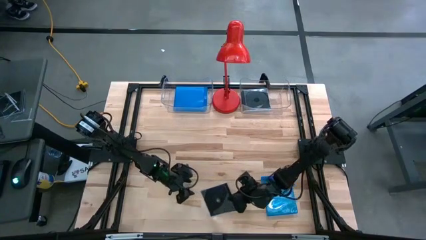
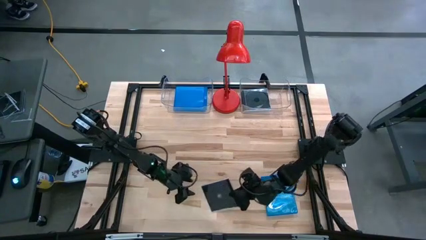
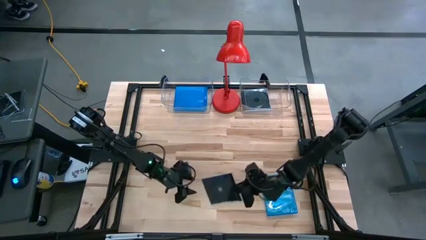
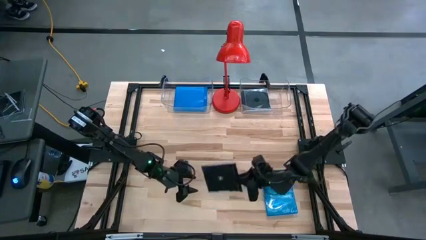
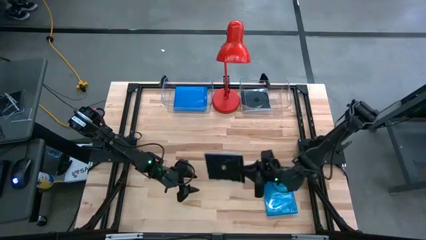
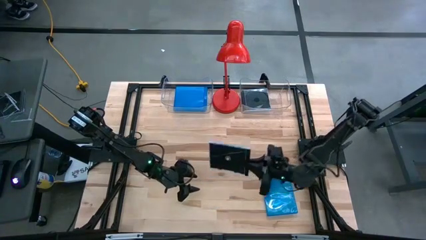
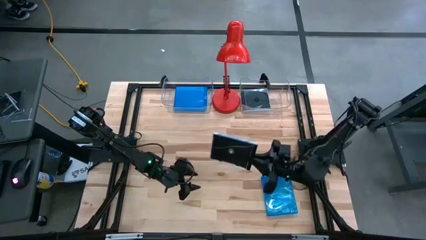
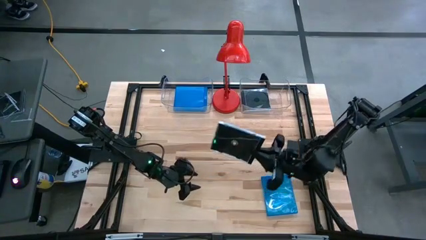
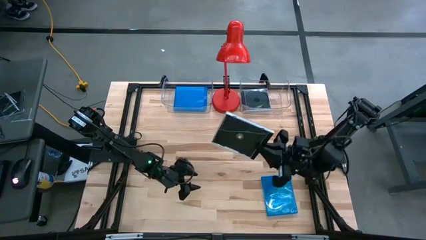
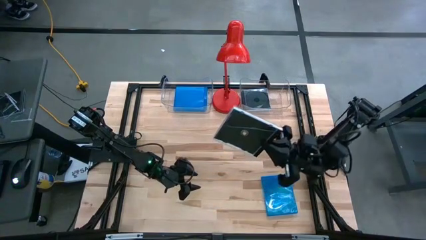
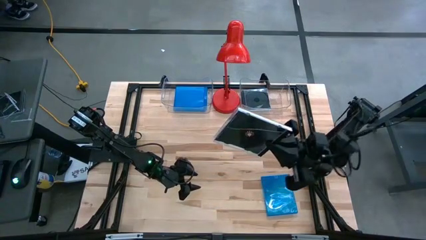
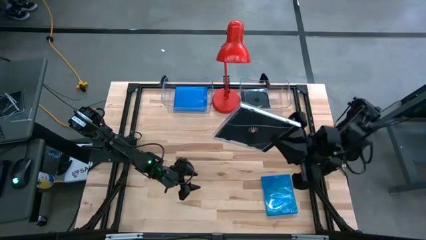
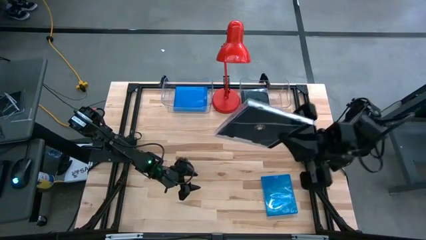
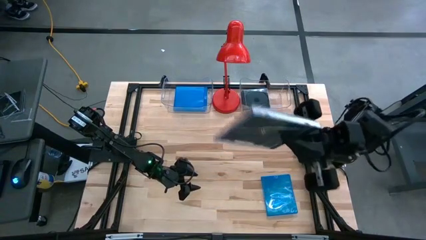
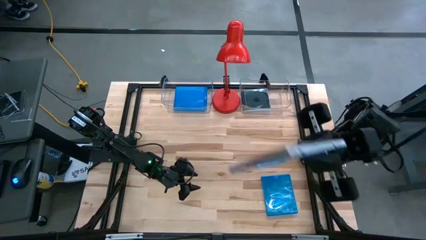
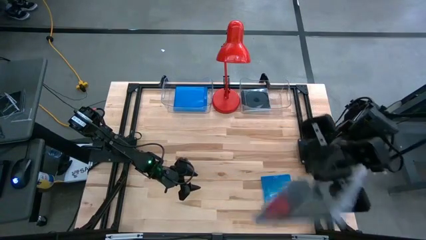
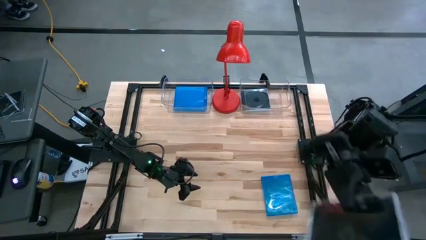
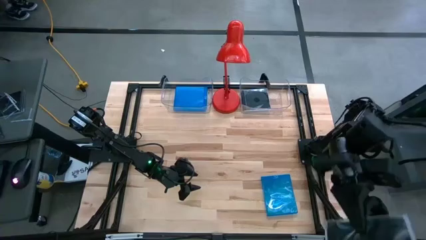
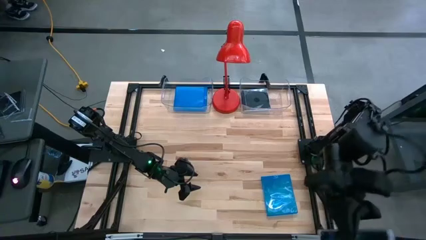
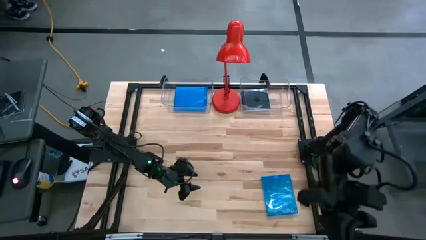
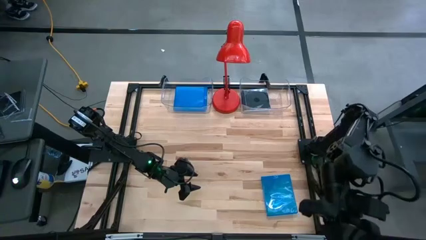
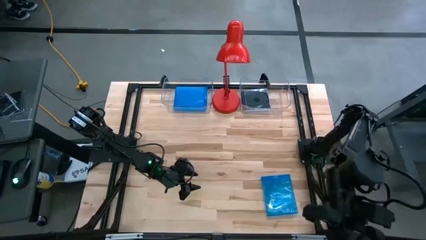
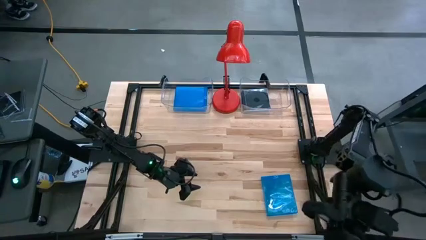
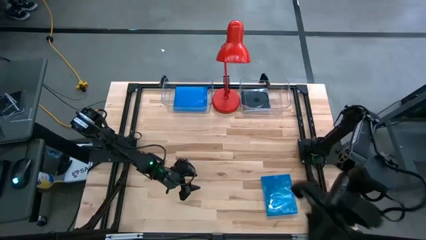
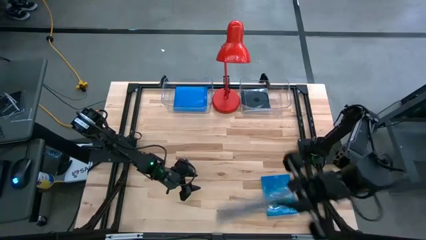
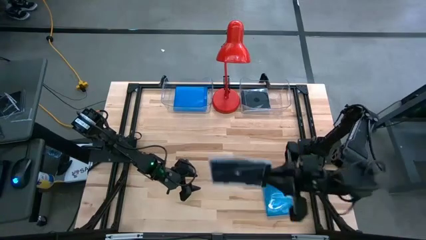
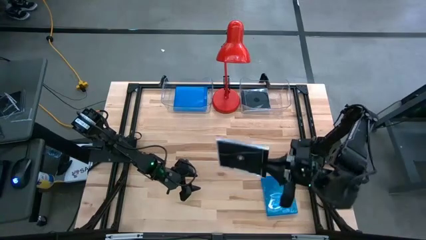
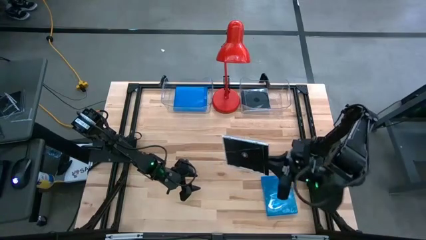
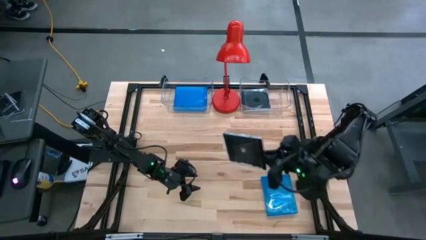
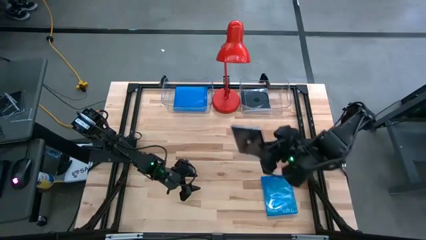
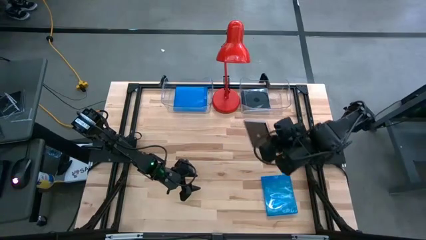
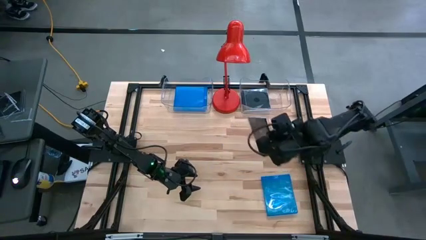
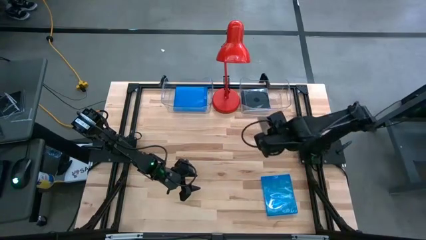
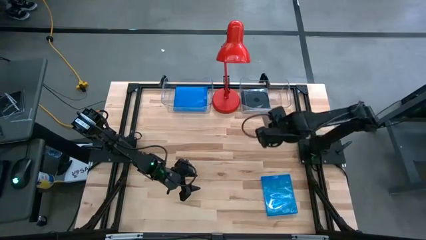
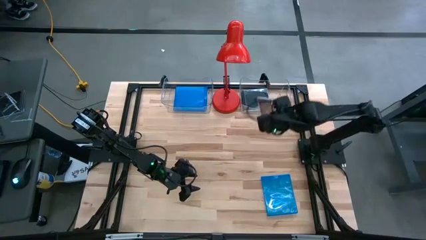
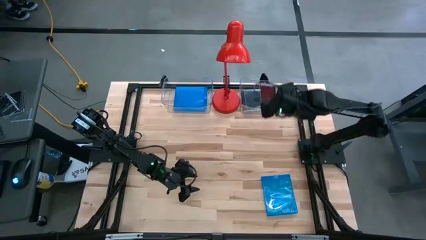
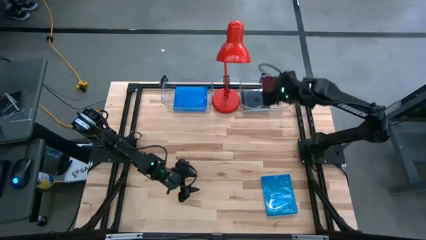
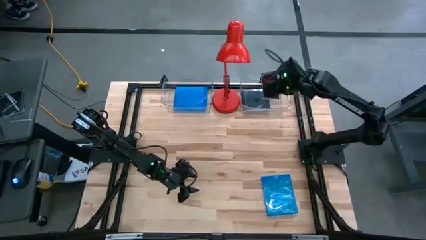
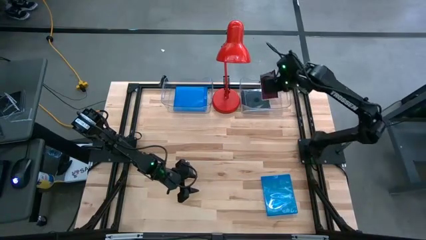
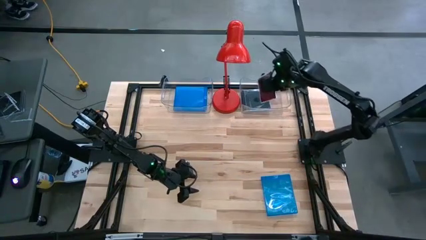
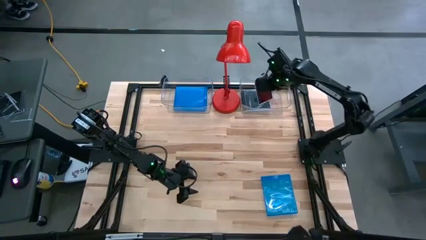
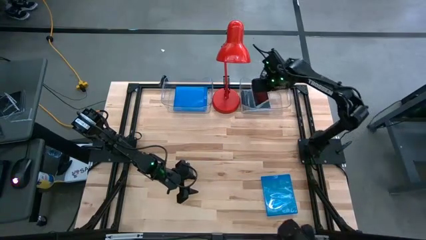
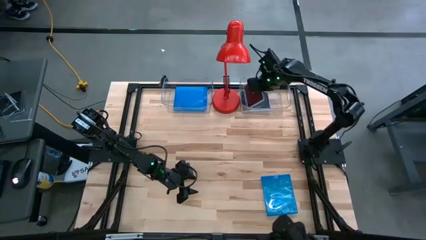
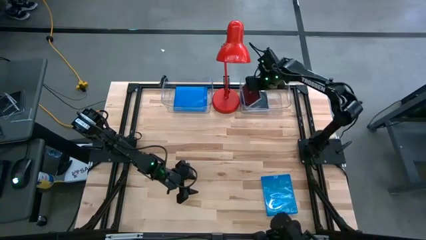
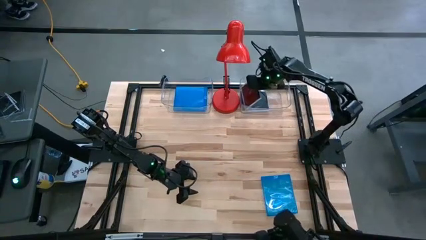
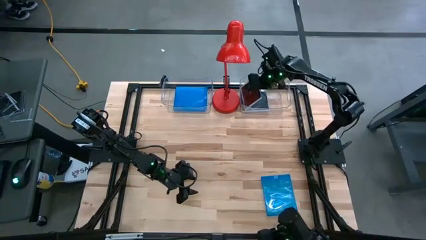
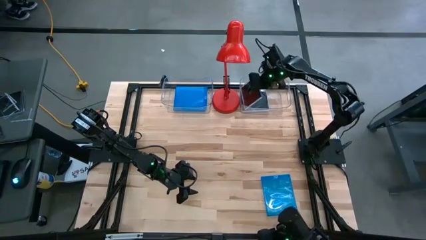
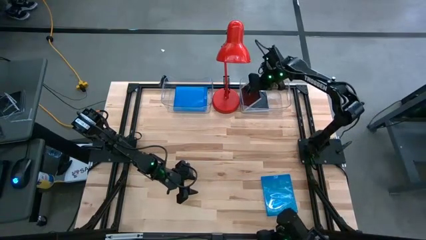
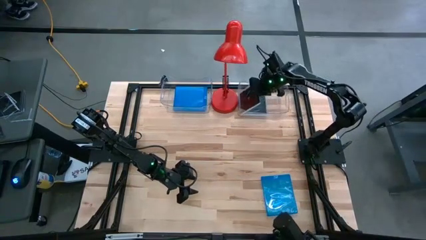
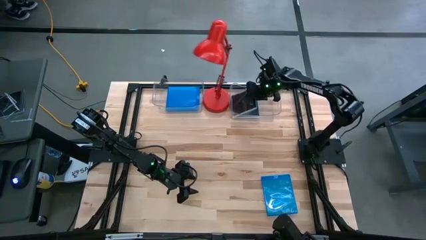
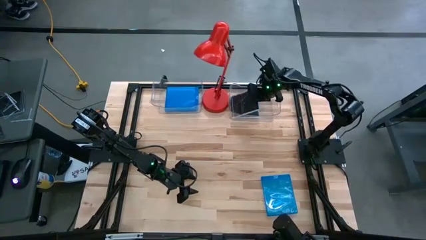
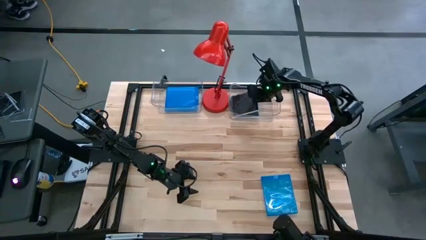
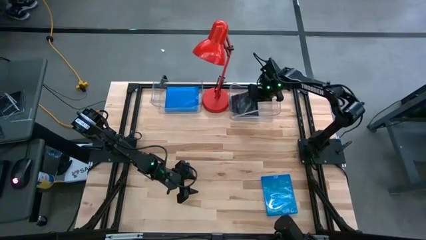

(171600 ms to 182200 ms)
Task: Pick & place jewel cases by type
Put the black cd case into the right transparent bin

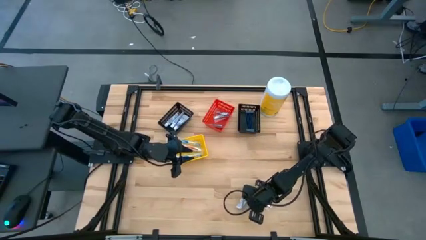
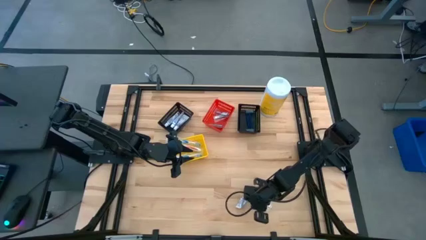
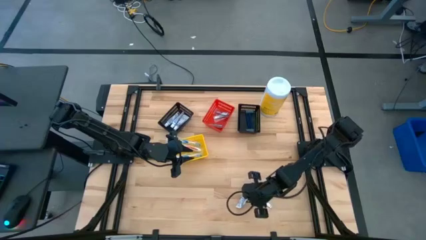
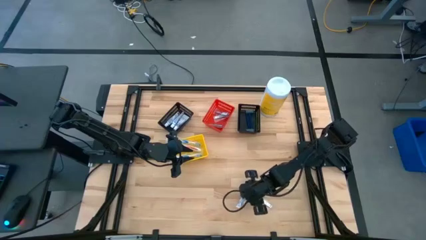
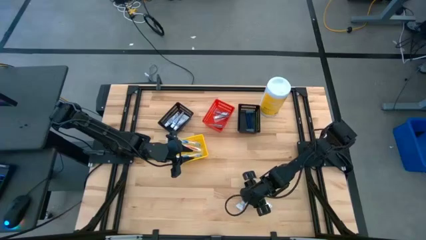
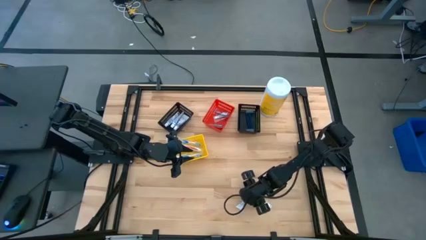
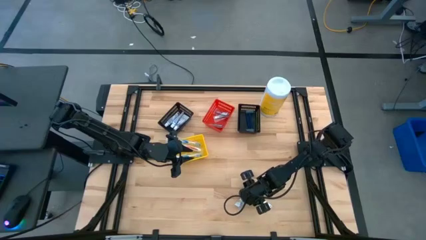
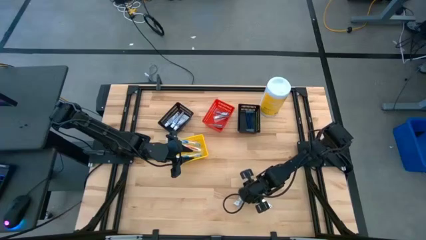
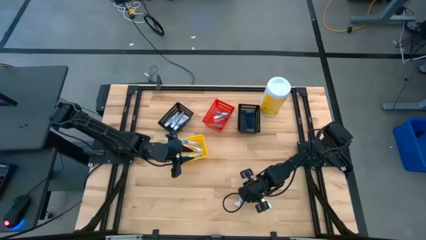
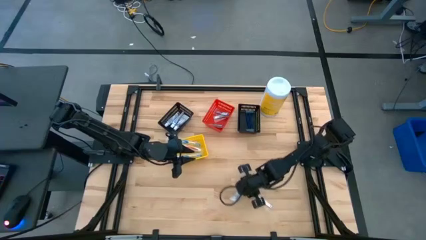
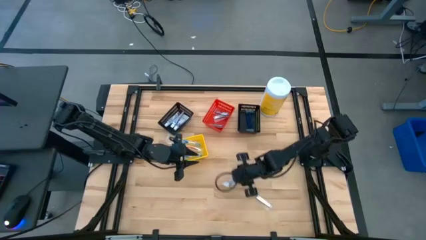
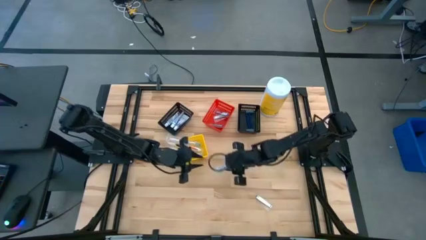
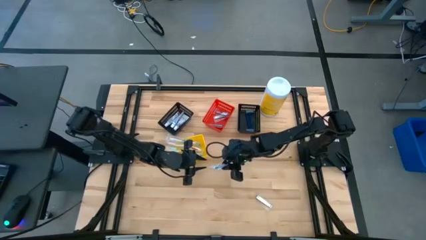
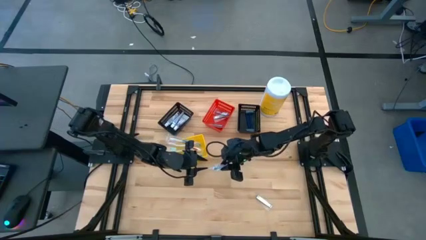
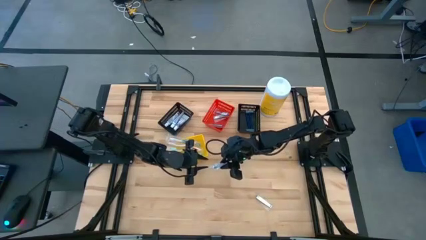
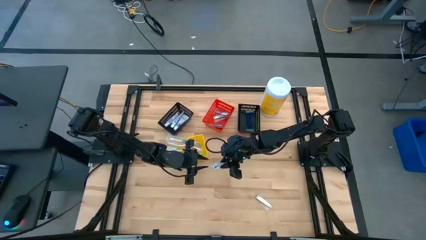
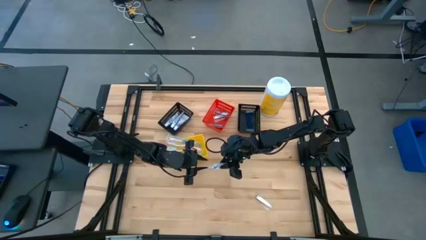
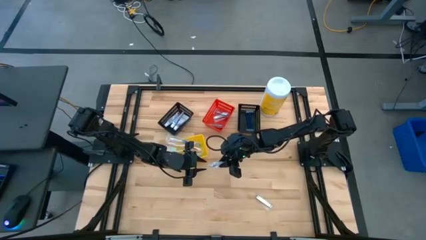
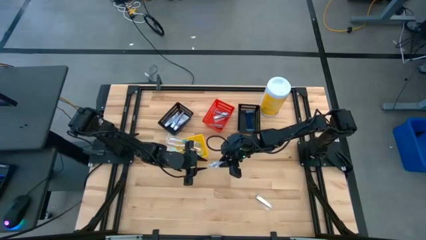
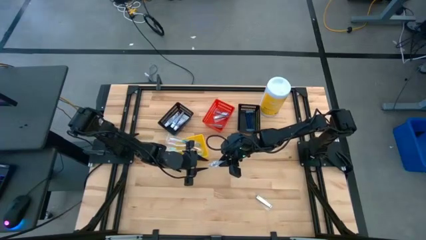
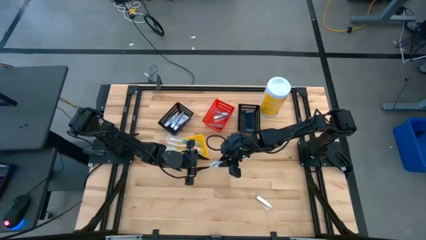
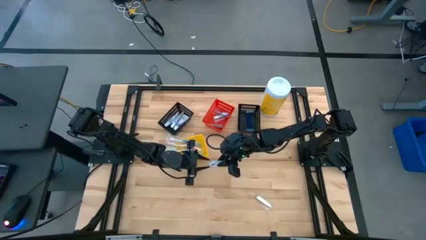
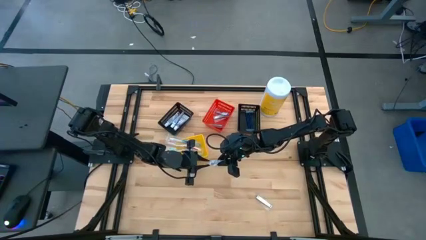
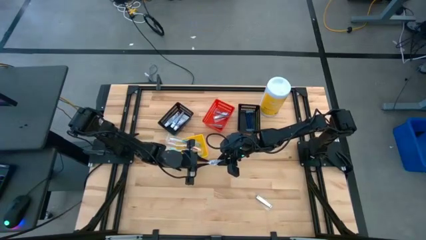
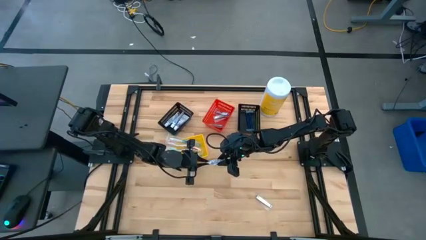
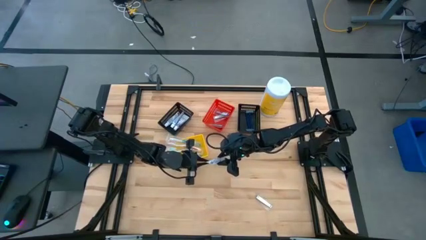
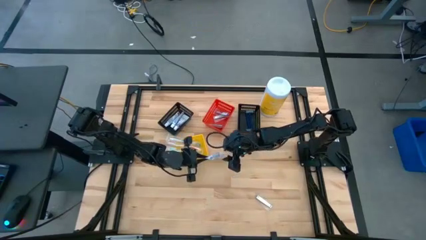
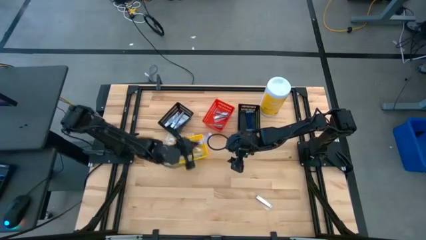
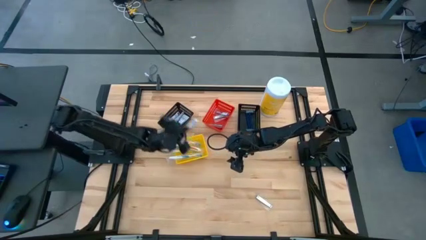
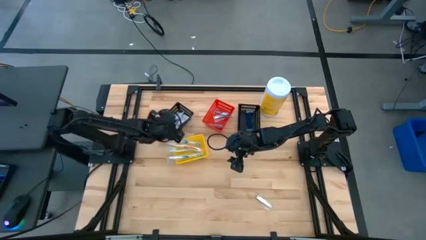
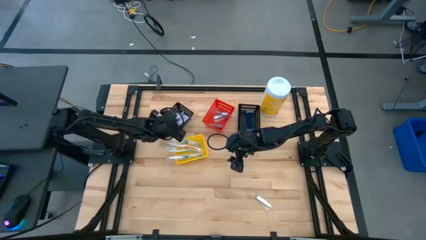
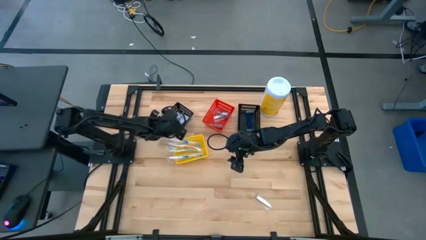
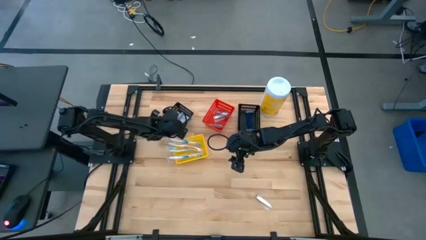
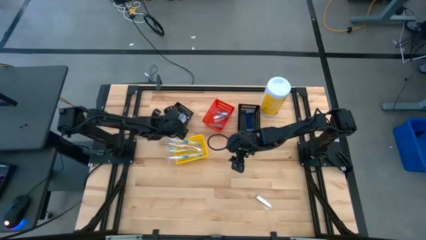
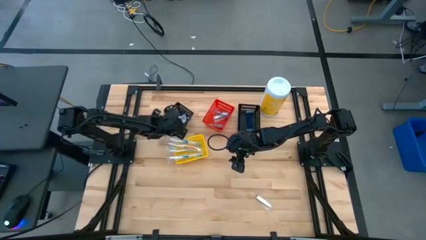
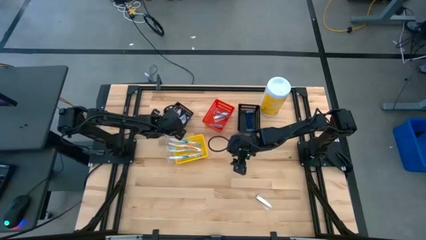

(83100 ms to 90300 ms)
Task: Pick & Place Travel size toiletries
Put the white toothpaste into the left black bin
